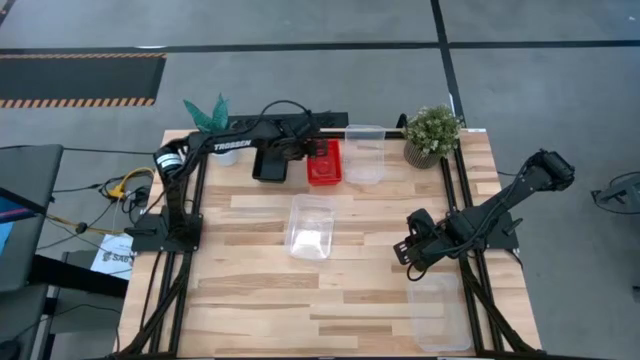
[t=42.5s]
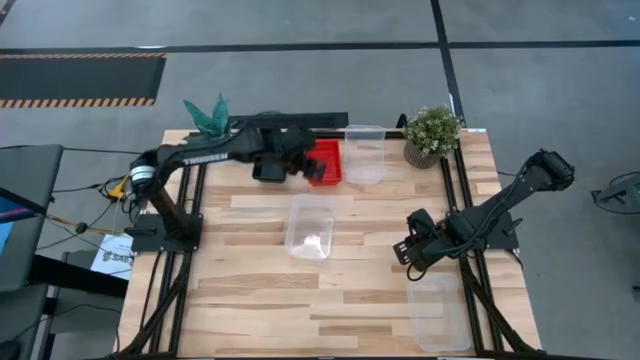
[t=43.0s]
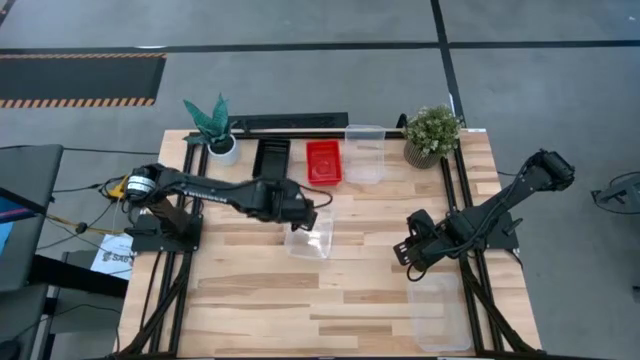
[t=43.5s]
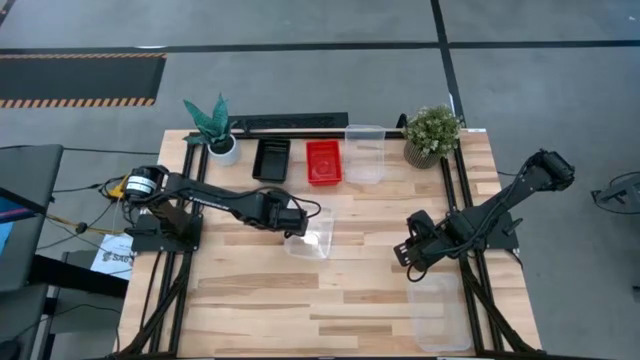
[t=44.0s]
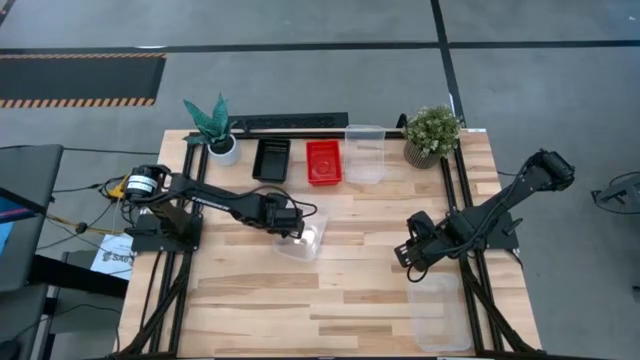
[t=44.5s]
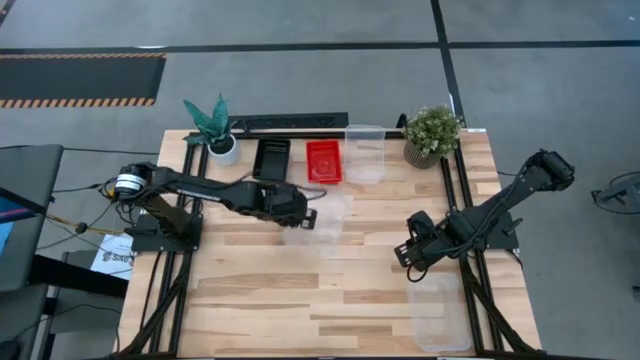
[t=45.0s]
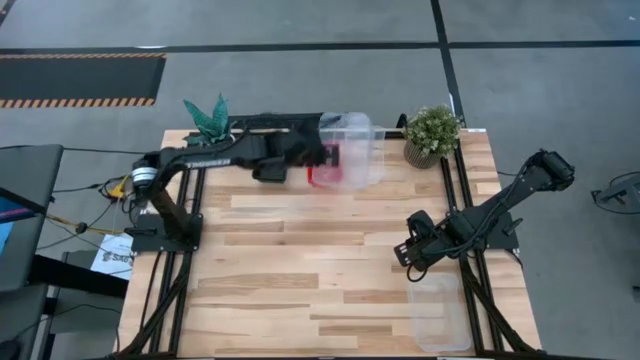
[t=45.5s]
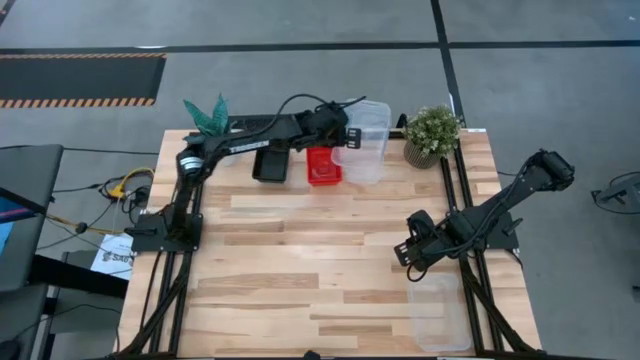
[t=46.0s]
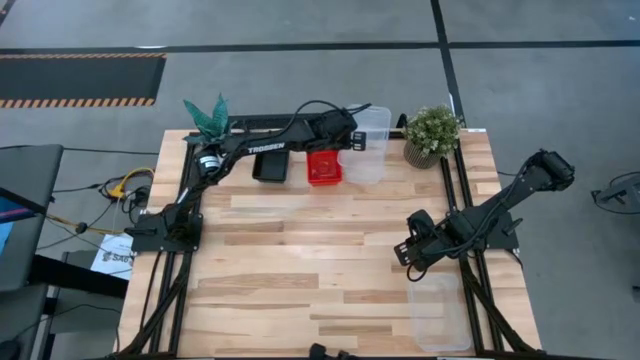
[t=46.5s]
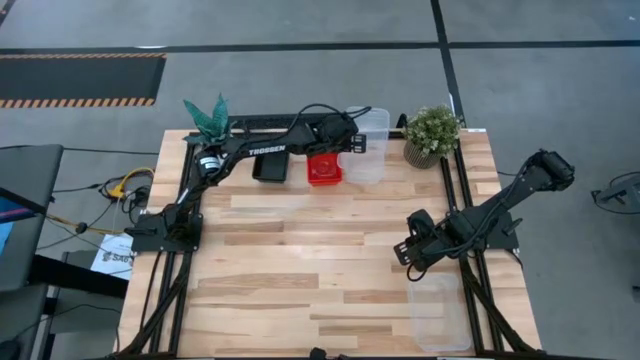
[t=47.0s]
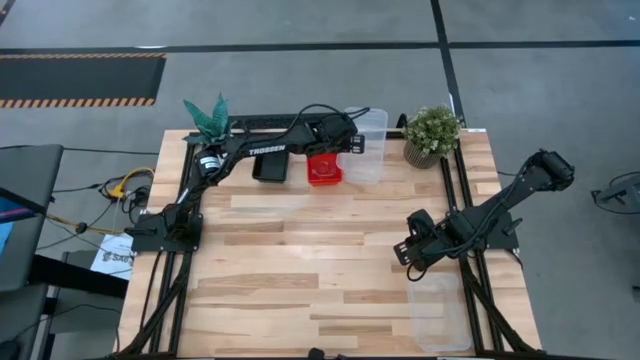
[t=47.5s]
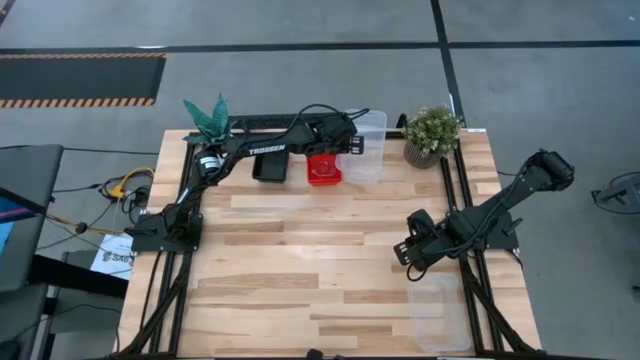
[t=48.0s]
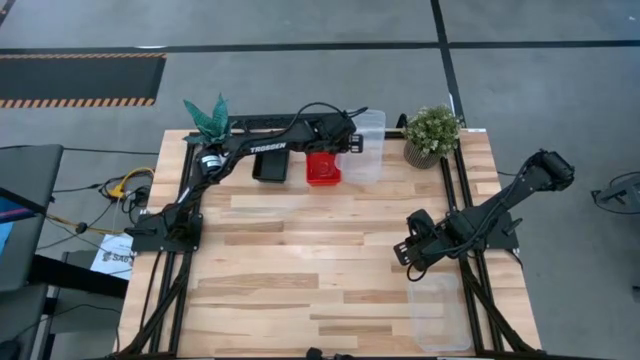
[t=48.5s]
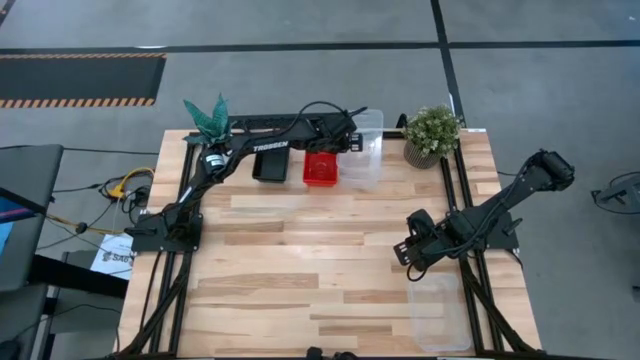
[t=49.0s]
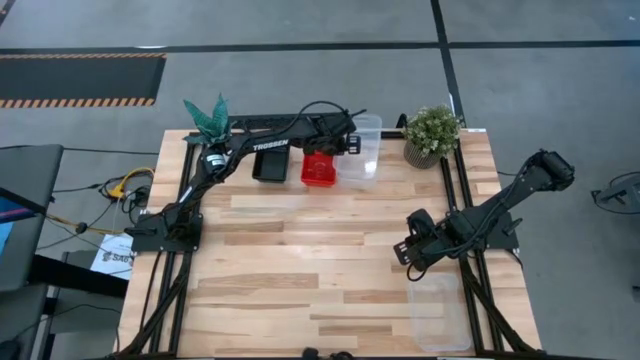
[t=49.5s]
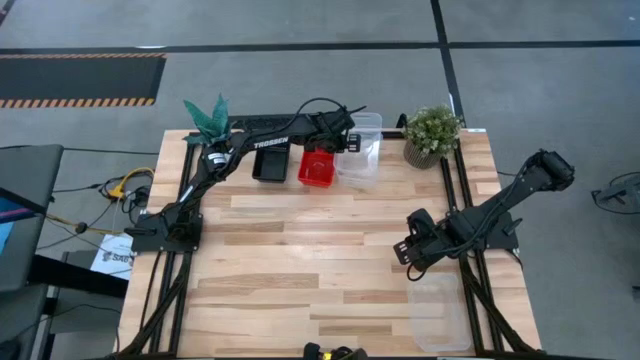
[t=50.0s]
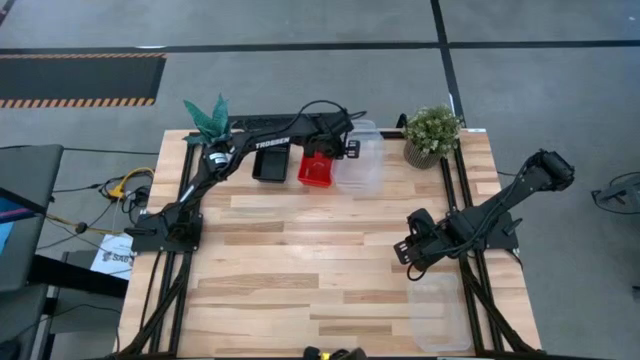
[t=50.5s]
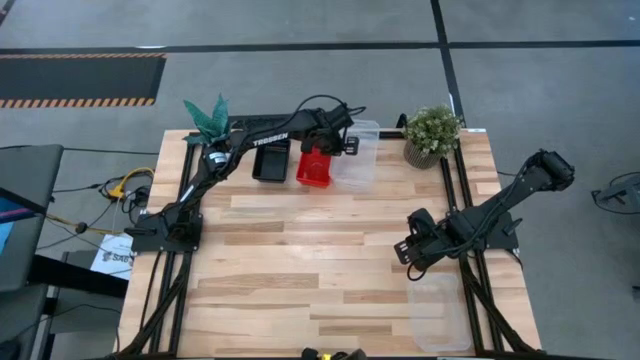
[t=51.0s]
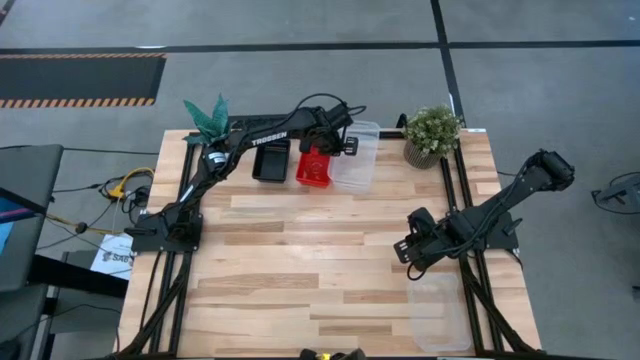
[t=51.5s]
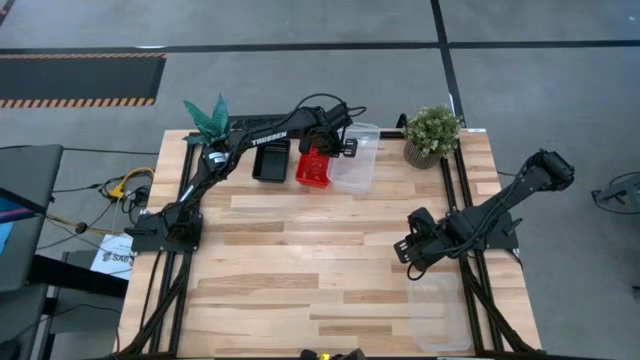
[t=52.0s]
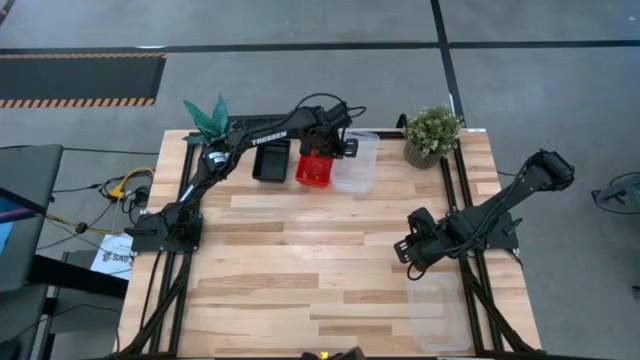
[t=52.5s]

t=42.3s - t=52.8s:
Stack the middle transparent bin on the top transparent bin

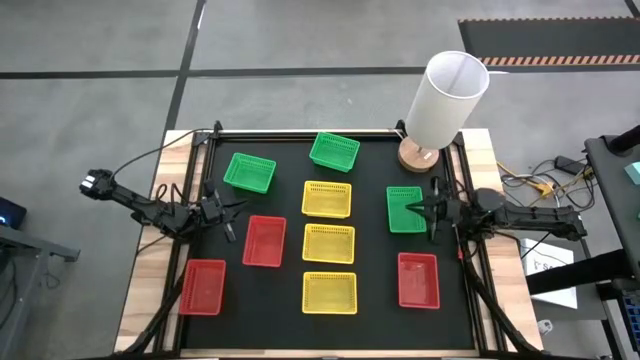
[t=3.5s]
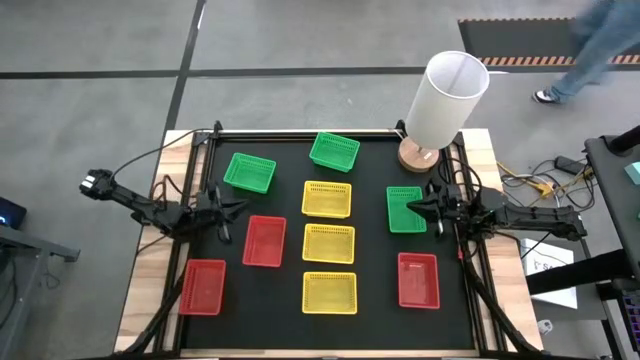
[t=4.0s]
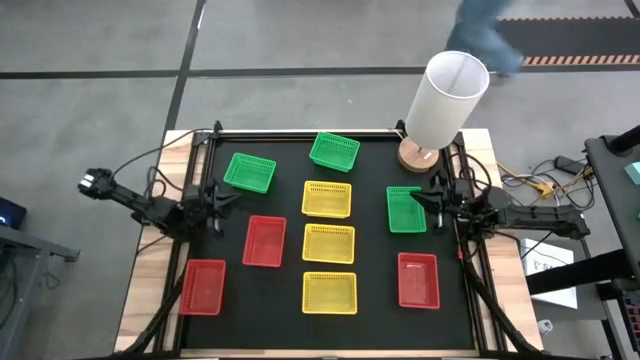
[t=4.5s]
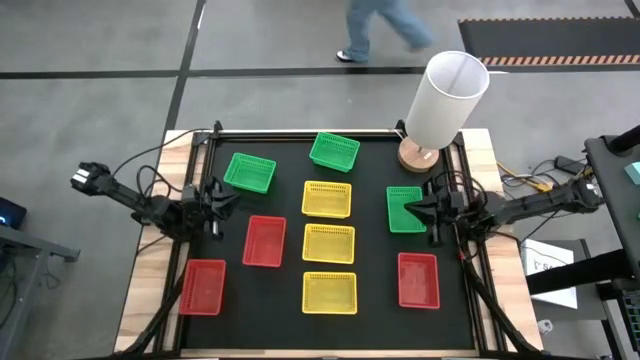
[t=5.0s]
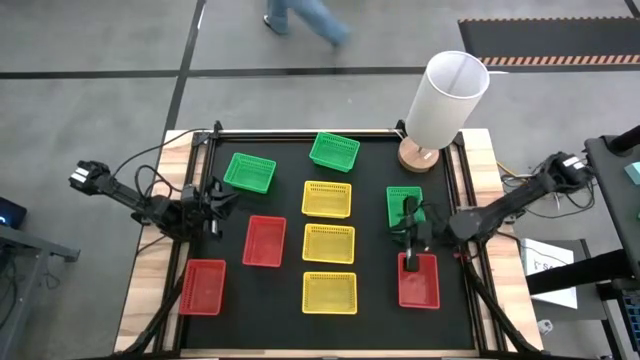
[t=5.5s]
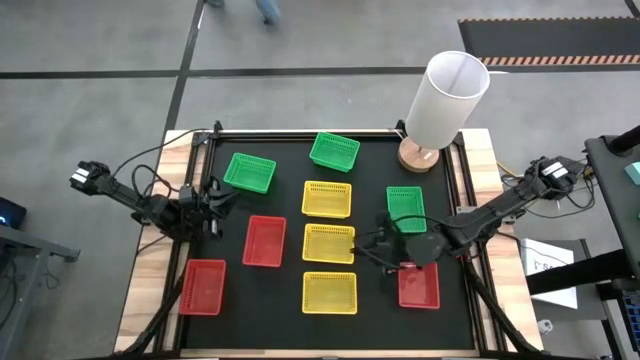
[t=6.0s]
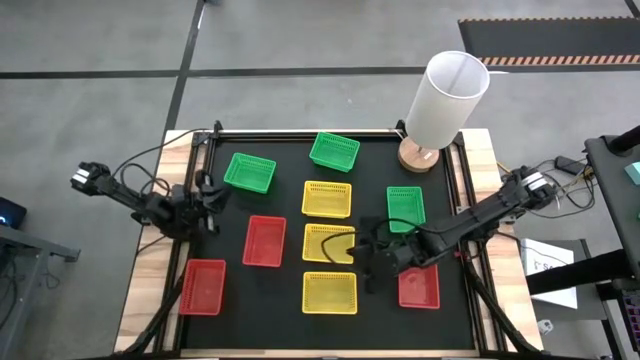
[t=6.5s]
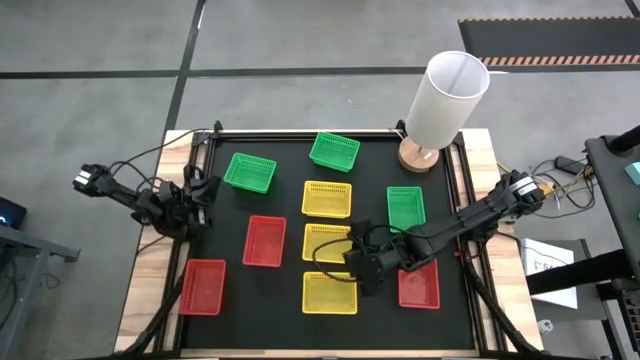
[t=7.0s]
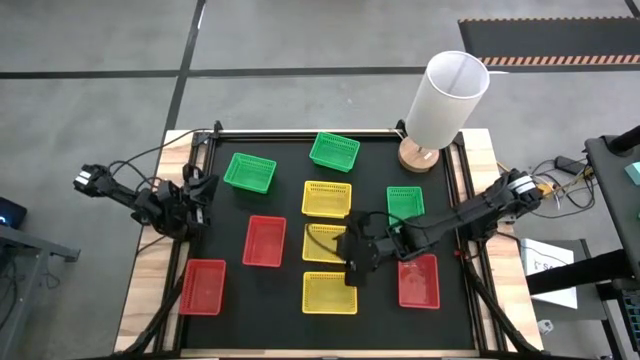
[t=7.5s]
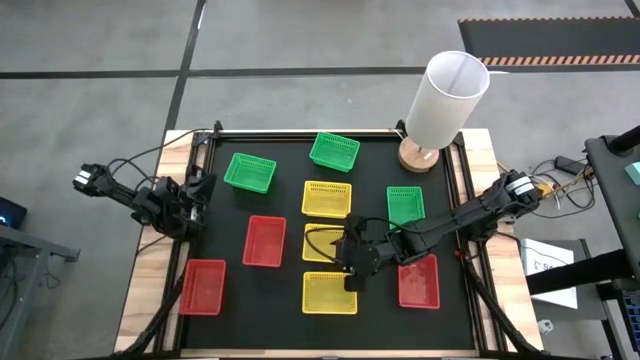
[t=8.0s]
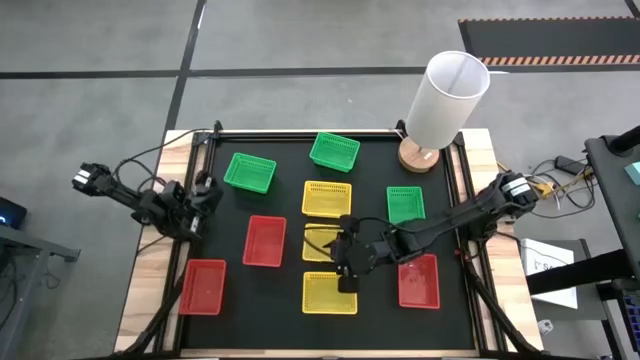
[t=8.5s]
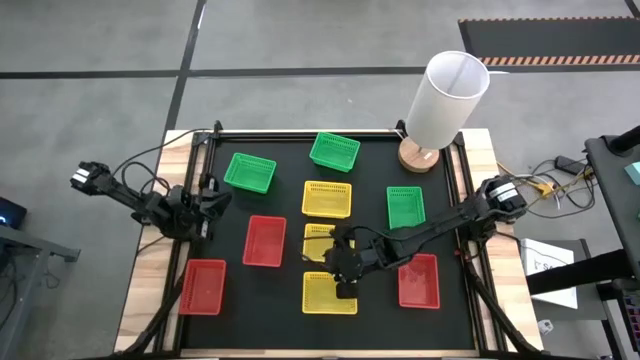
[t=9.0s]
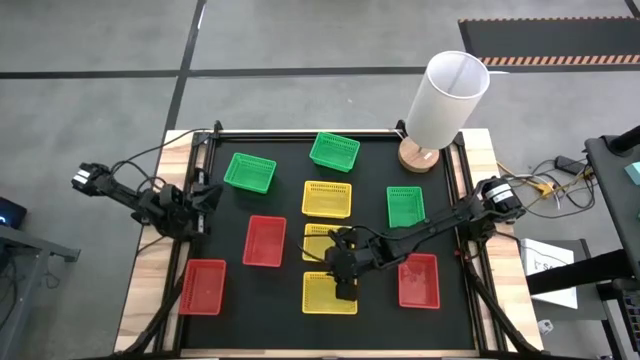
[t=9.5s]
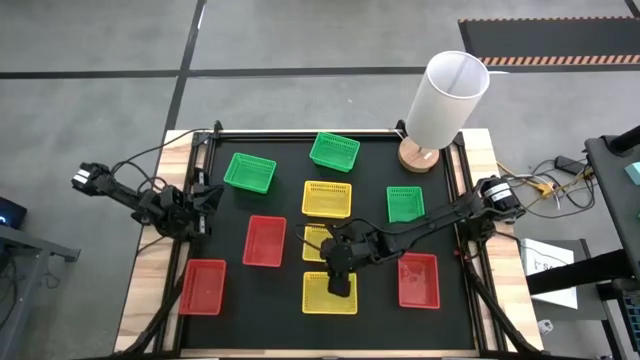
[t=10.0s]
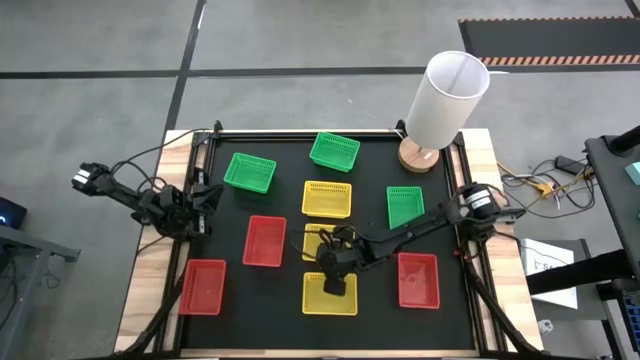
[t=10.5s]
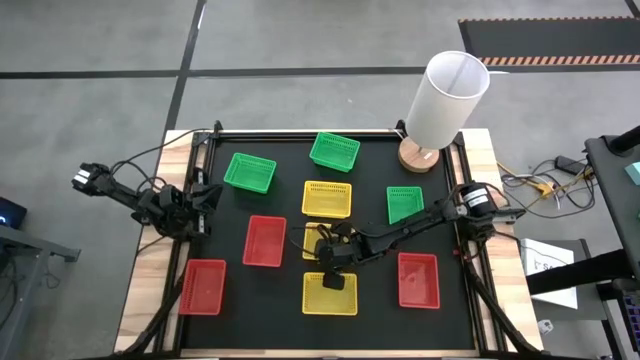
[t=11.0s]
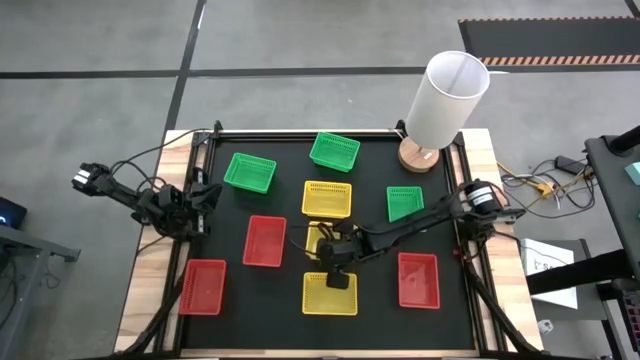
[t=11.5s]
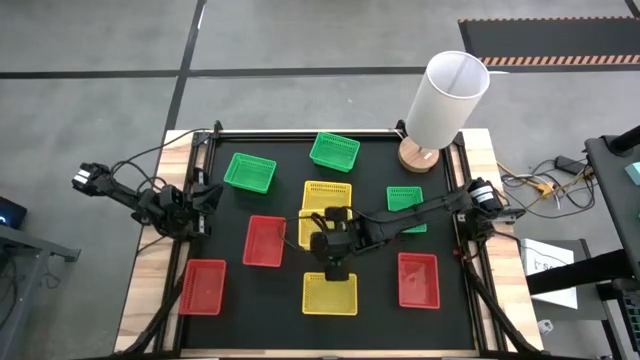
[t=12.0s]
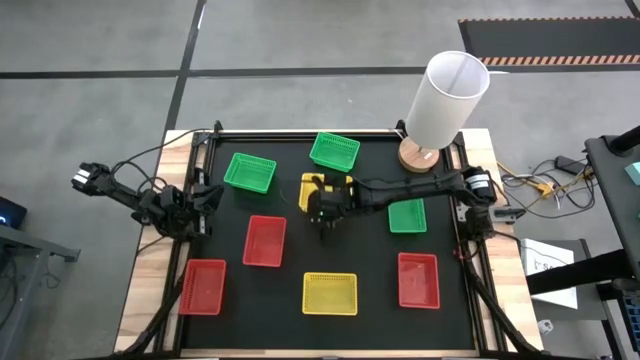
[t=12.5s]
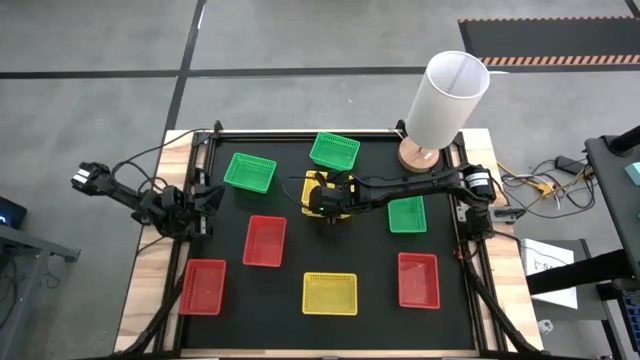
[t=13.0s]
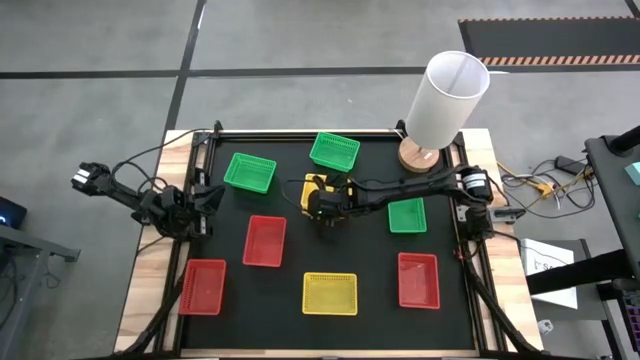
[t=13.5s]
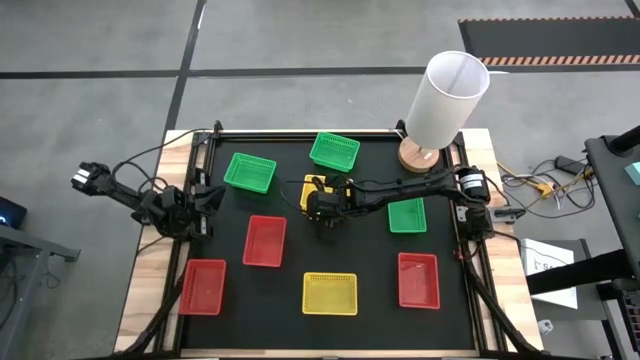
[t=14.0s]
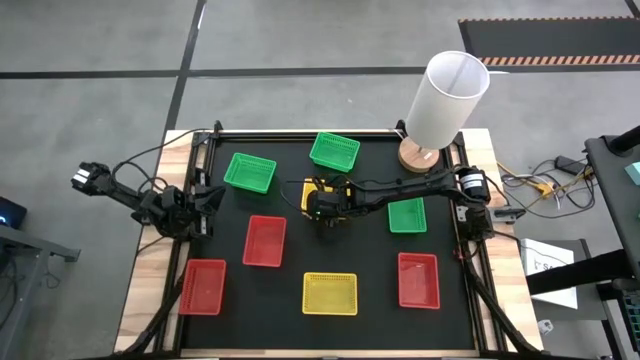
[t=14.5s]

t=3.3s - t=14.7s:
Stack the center yellow bin on top of the top yellow bin
